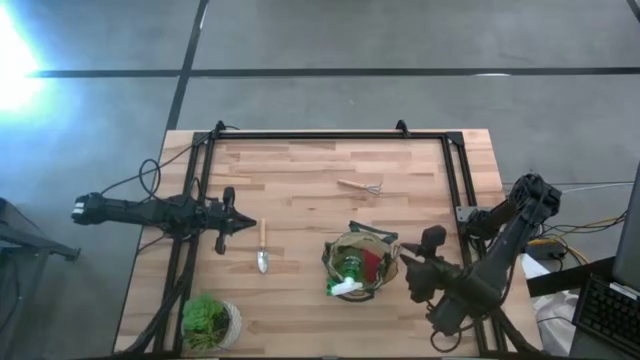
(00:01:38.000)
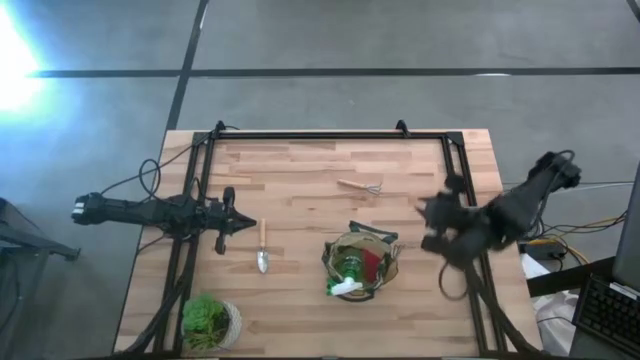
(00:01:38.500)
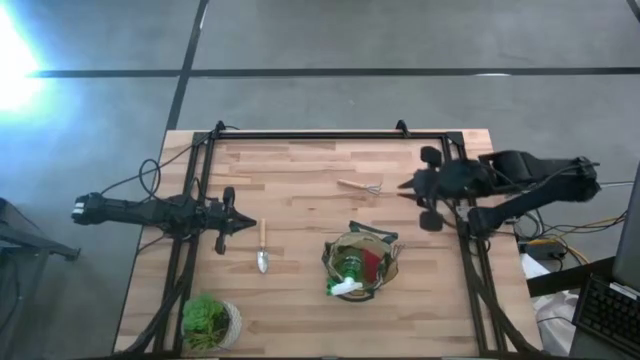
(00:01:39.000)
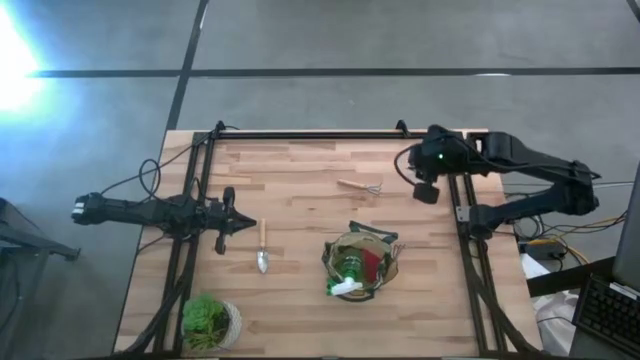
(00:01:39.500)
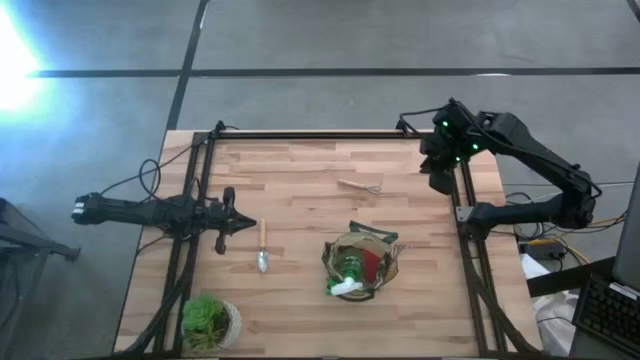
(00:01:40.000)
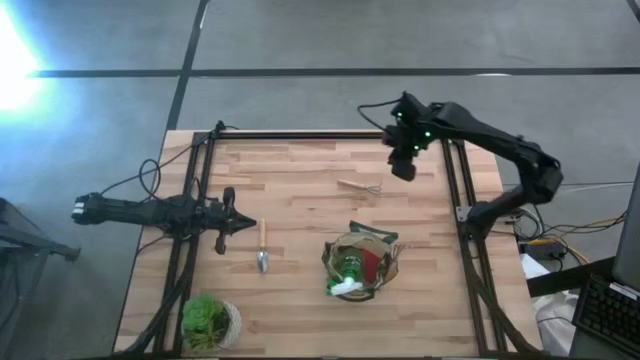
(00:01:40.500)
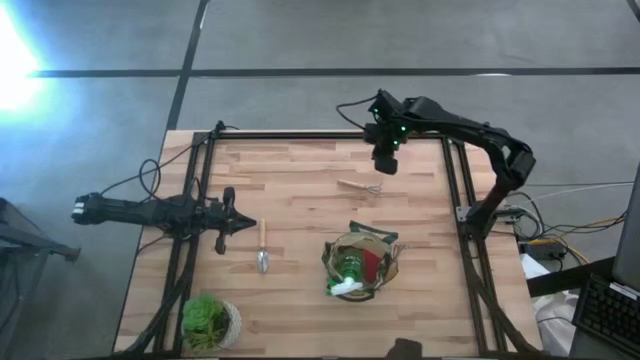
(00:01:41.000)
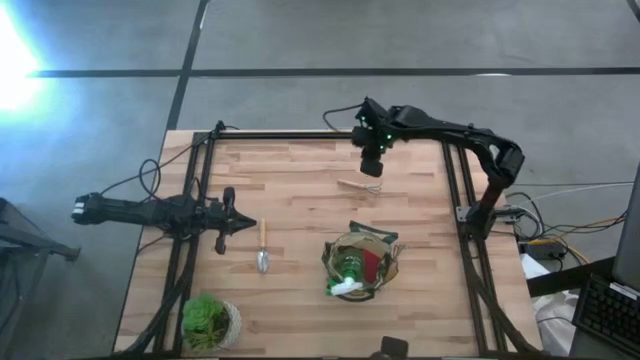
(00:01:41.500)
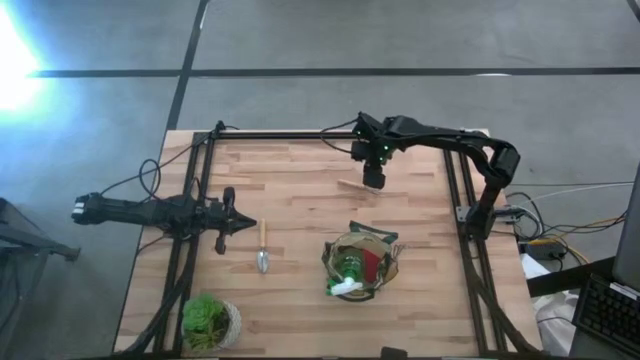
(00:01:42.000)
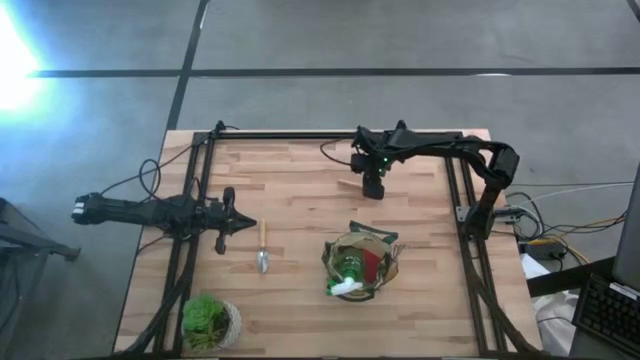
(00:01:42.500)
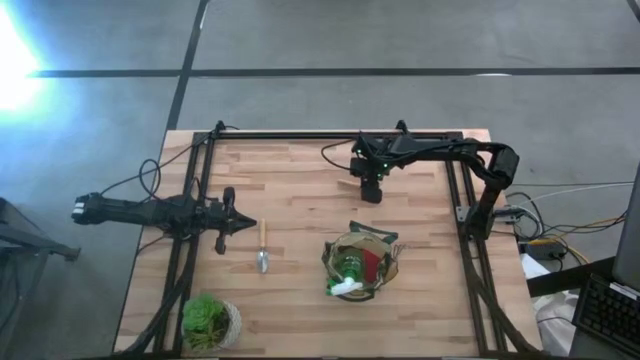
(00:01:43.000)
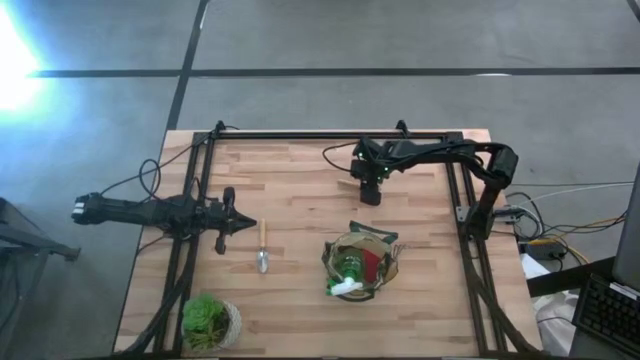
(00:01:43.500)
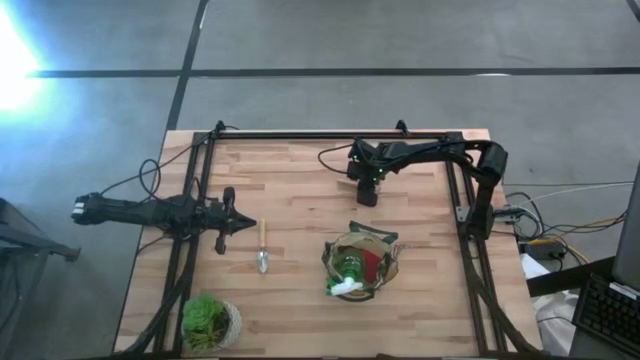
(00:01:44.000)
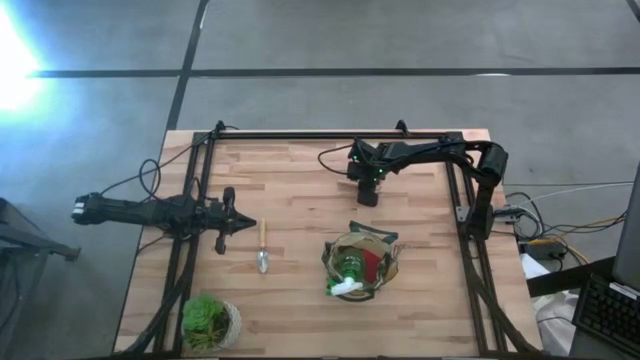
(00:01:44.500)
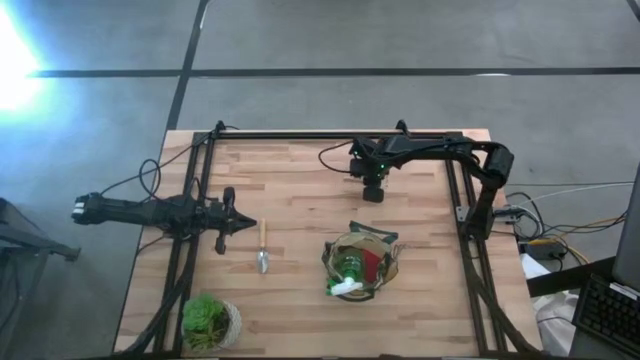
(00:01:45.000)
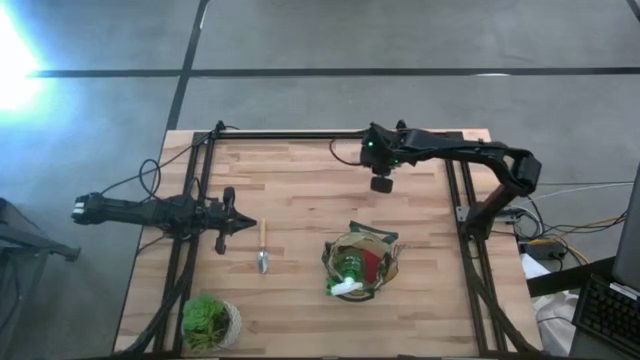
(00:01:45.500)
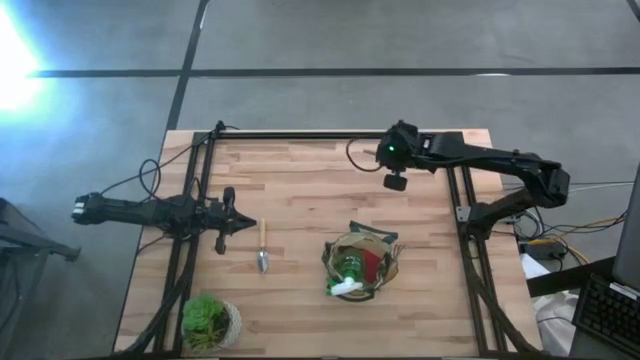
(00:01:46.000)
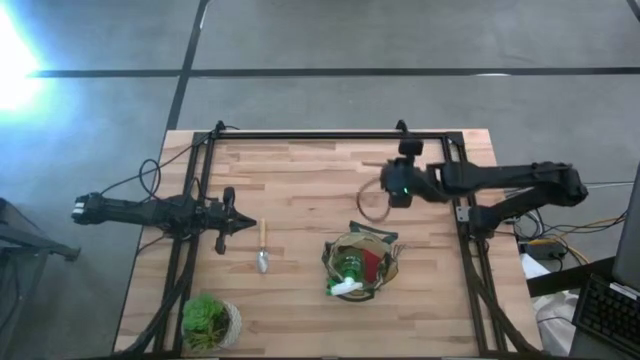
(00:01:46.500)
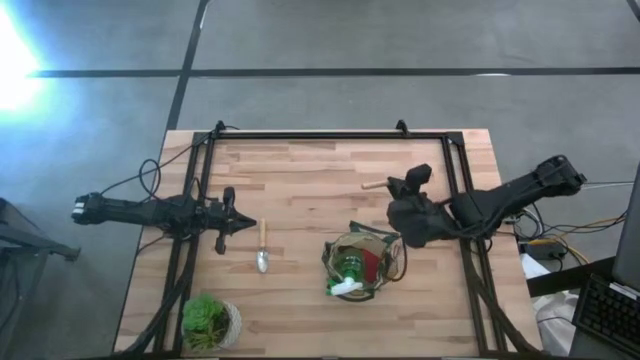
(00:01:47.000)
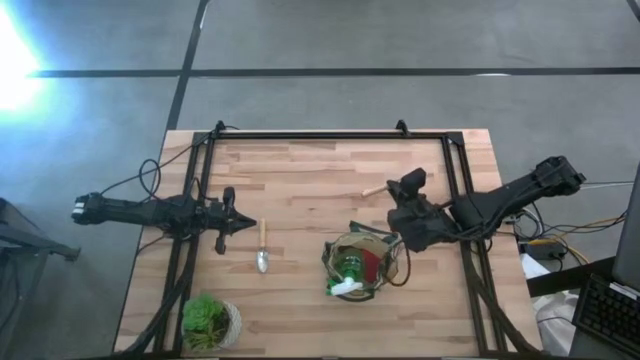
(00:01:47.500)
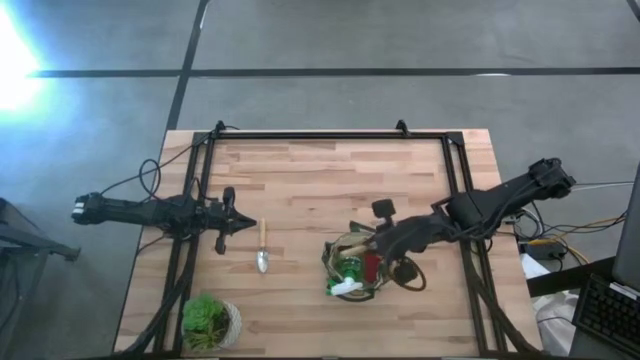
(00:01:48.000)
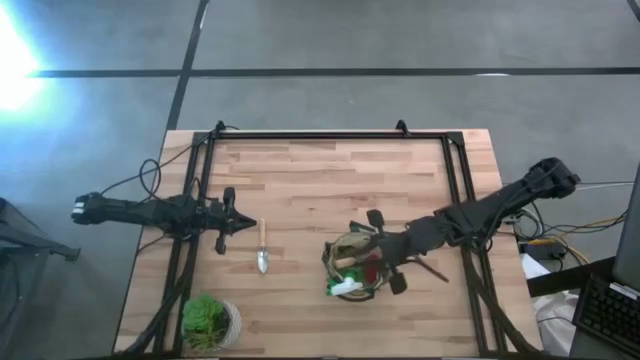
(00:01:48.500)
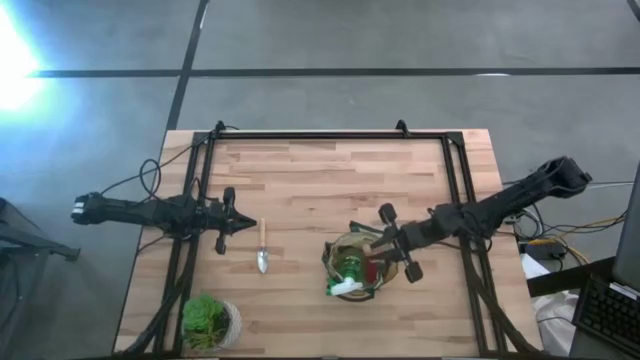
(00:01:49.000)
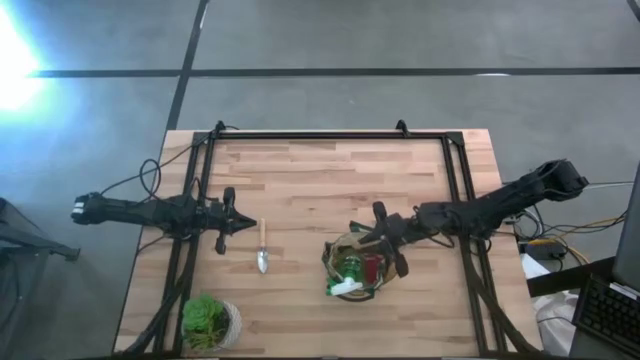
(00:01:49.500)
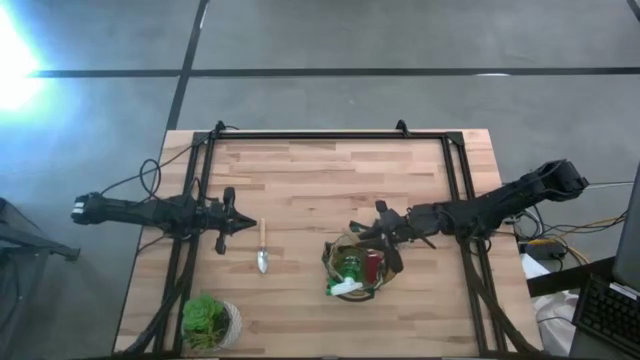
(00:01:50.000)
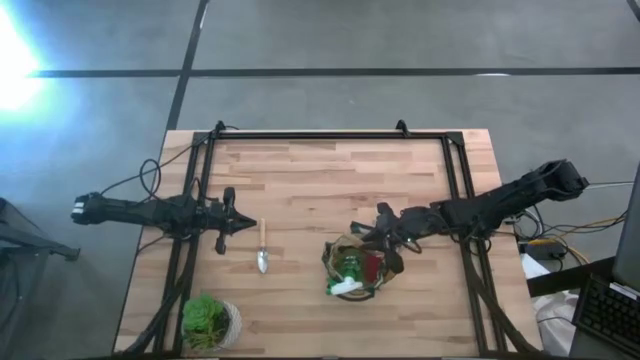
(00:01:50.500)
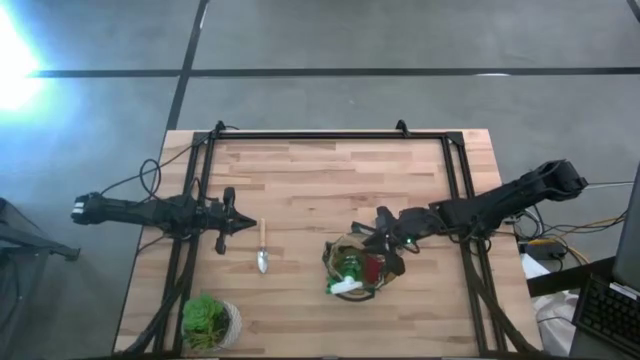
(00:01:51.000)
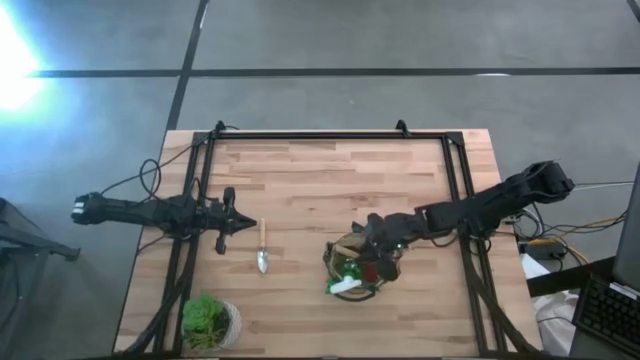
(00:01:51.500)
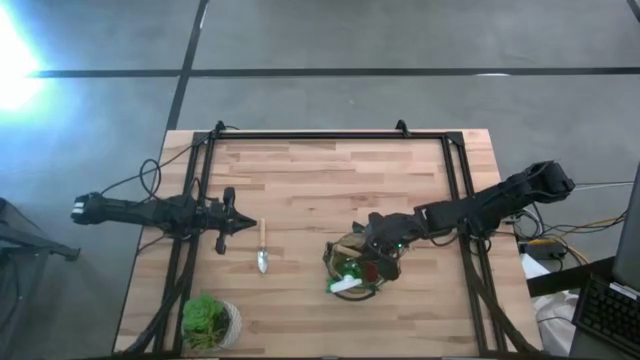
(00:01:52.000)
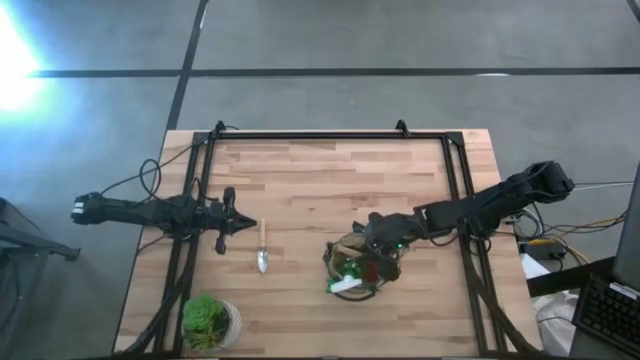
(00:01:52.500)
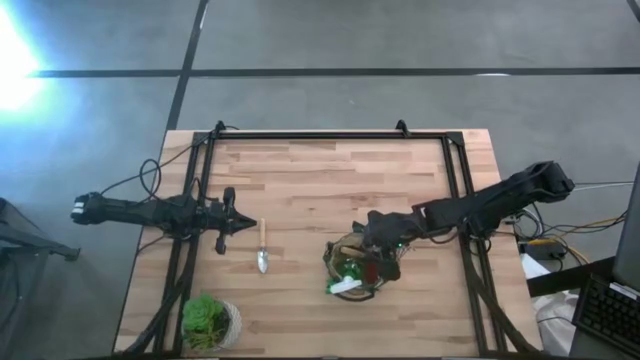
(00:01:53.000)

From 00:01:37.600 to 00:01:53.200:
Task: Pick & Place Garden tools in Gardening bag
Put the hand rake into the gardening bag

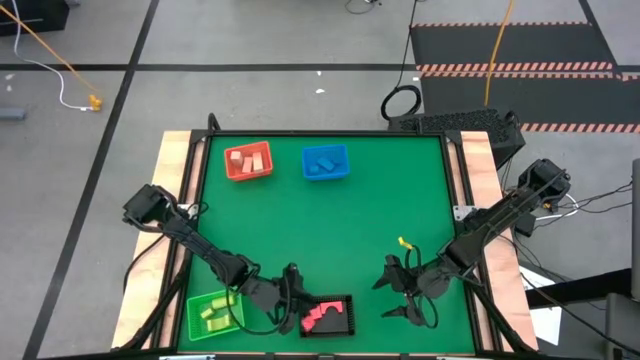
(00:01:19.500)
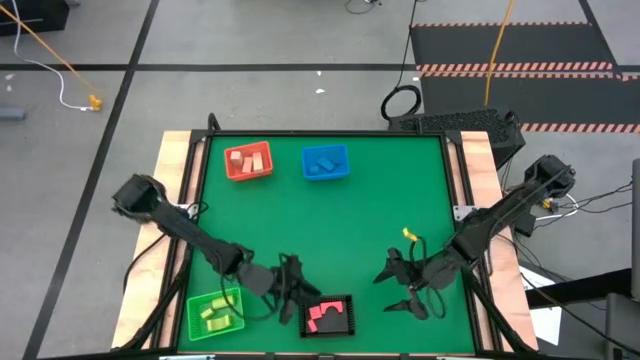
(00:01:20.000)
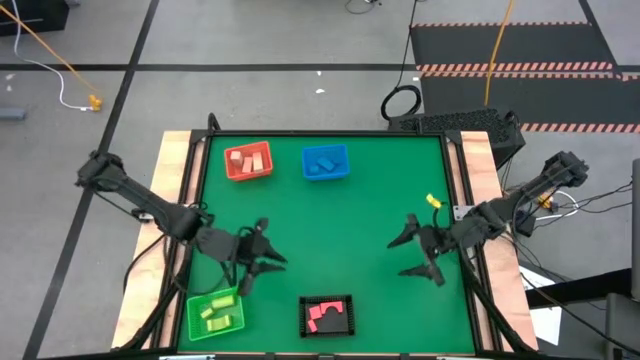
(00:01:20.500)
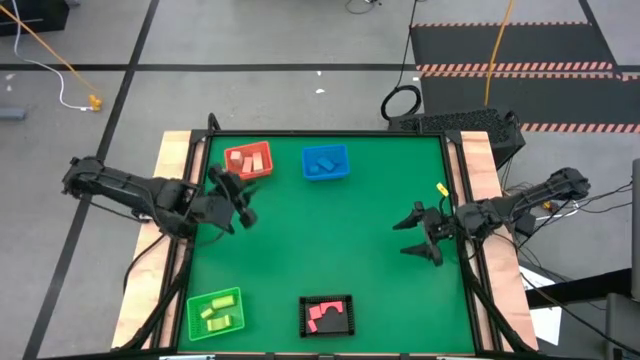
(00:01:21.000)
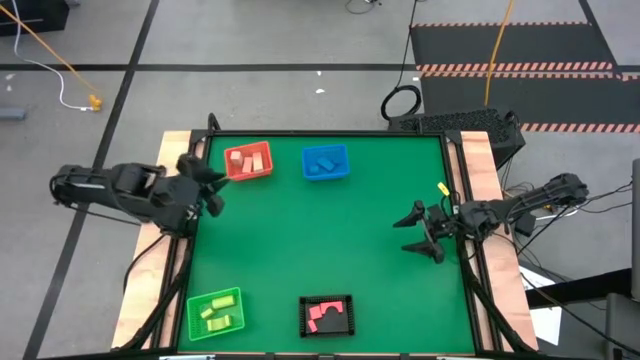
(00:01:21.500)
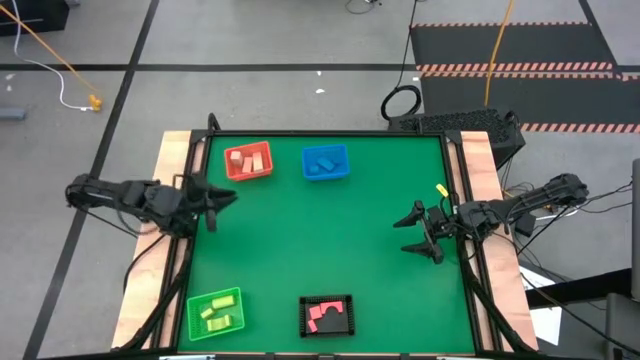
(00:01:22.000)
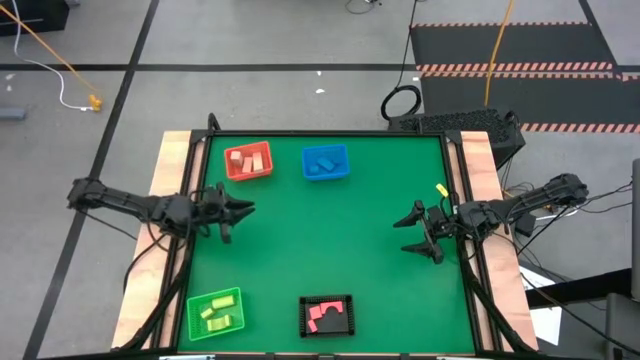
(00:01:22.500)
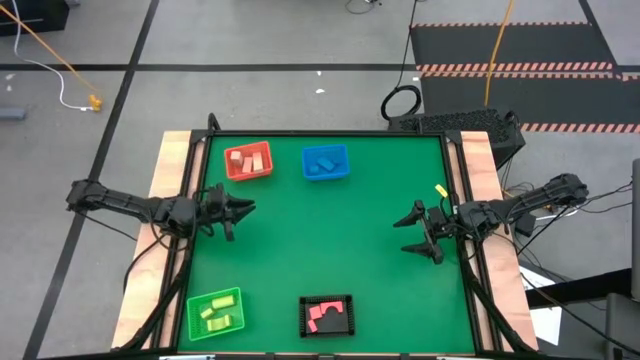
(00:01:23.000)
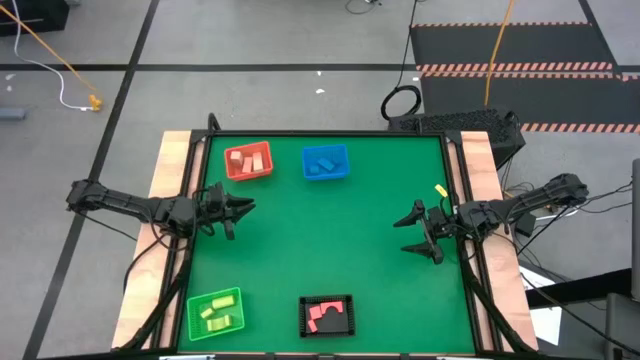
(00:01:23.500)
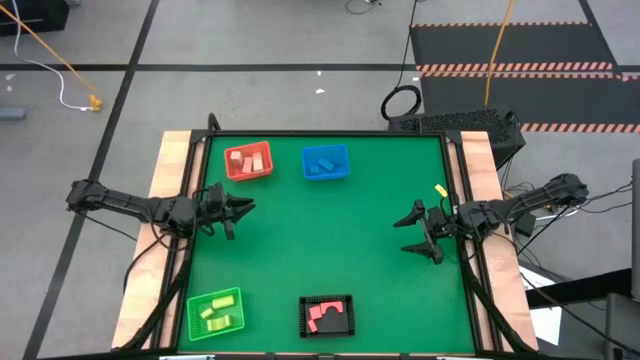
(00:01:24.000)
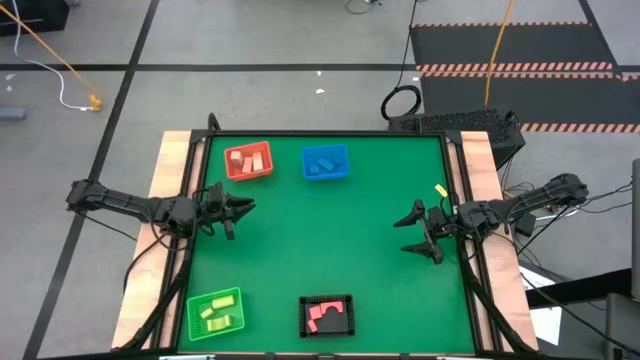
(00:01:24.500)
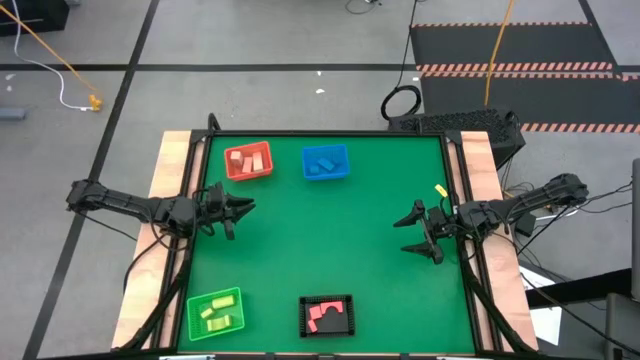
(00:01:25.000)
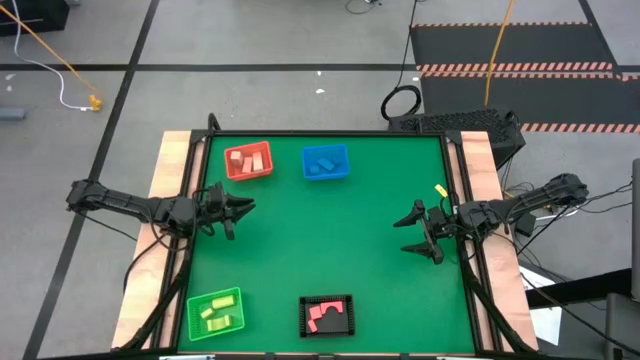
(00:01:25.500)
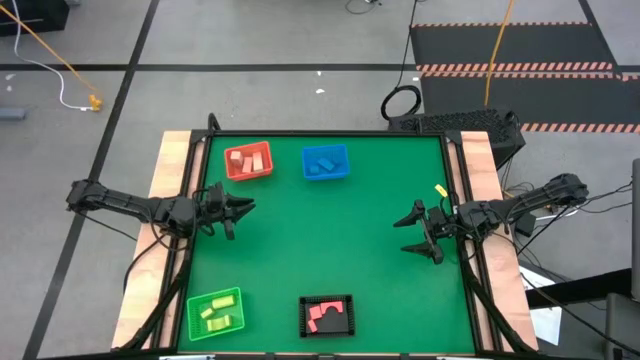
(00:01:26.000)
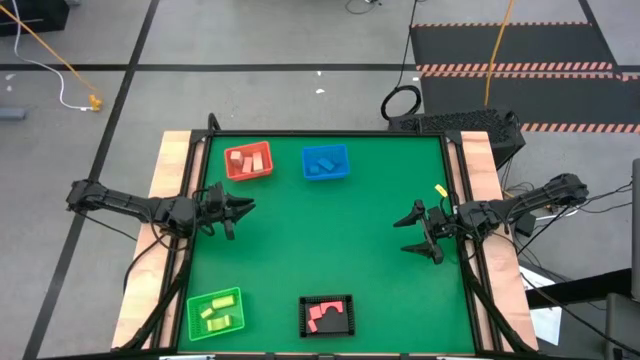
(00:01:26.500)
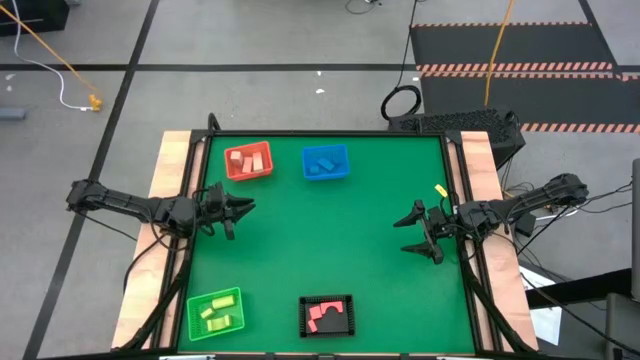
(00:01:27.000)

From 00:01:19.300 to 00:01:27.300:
Task: Sort & place blocks by color
Return to Home Position
